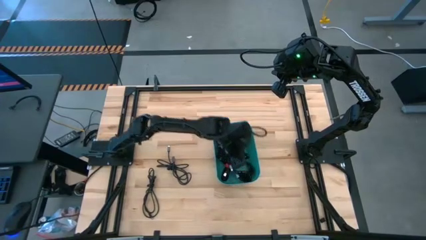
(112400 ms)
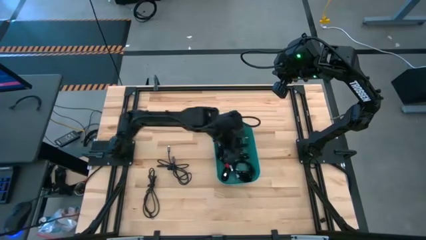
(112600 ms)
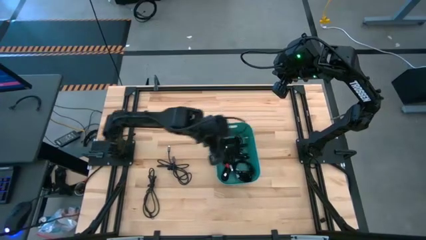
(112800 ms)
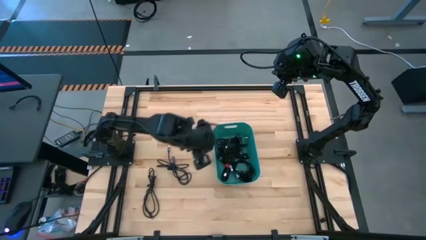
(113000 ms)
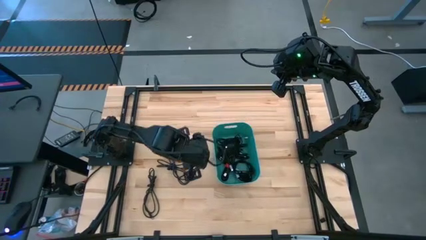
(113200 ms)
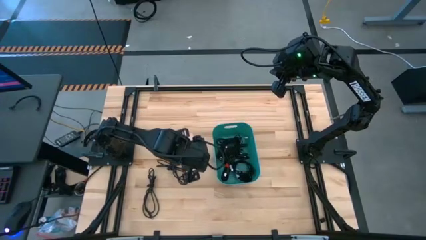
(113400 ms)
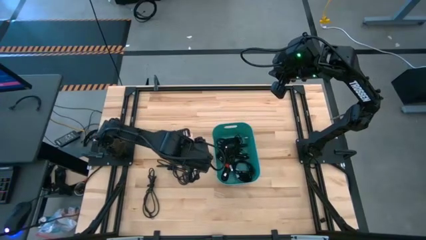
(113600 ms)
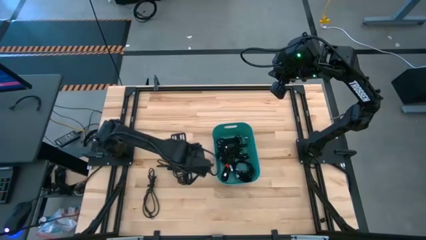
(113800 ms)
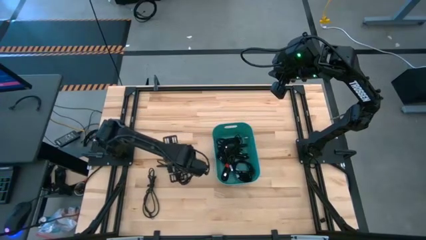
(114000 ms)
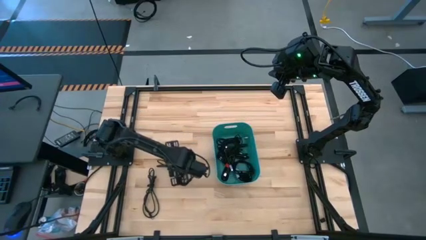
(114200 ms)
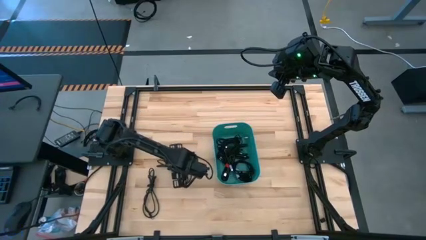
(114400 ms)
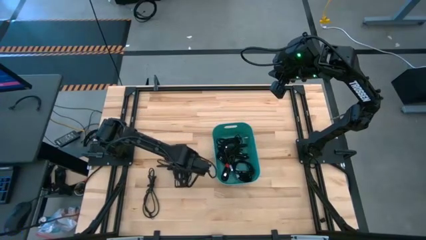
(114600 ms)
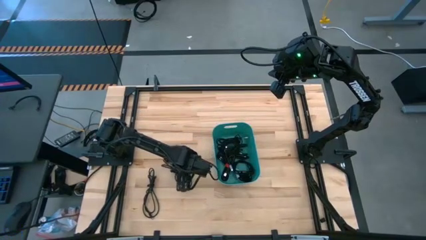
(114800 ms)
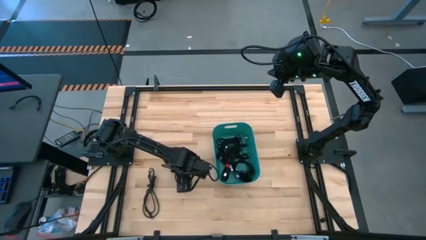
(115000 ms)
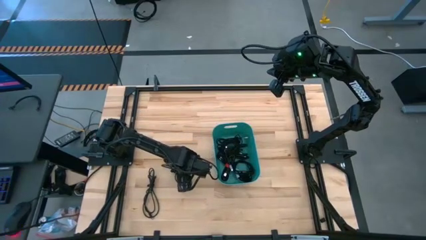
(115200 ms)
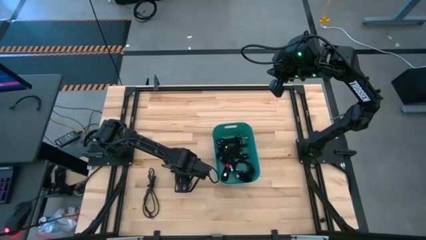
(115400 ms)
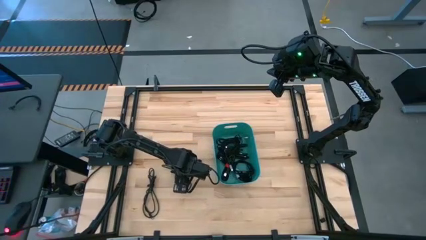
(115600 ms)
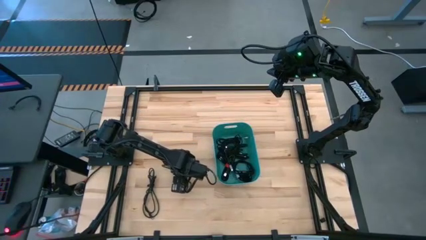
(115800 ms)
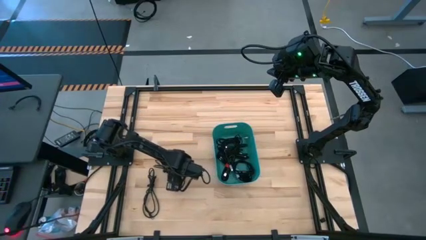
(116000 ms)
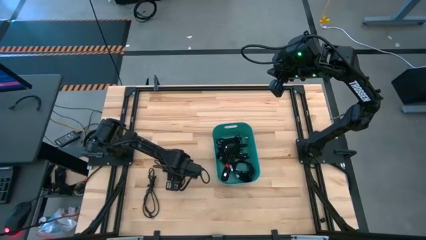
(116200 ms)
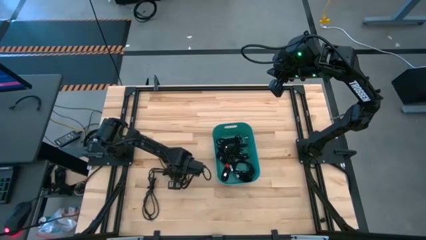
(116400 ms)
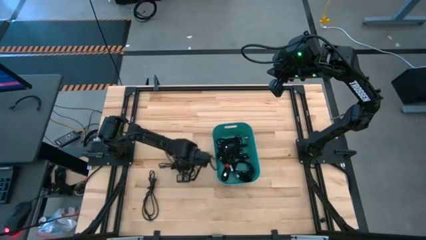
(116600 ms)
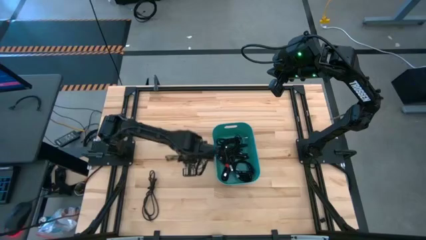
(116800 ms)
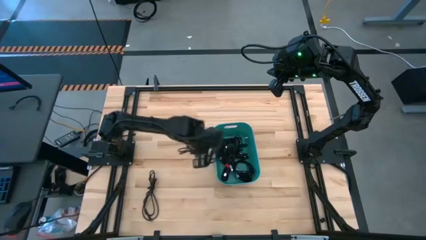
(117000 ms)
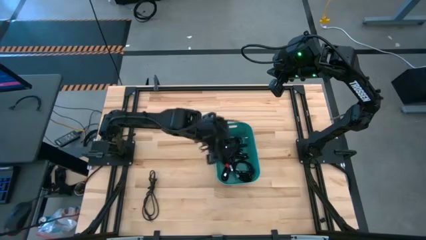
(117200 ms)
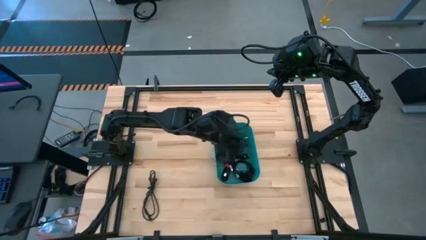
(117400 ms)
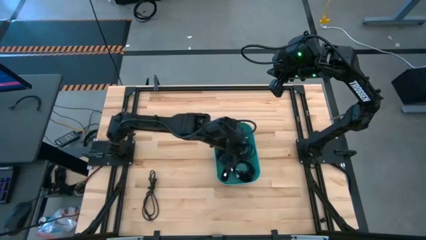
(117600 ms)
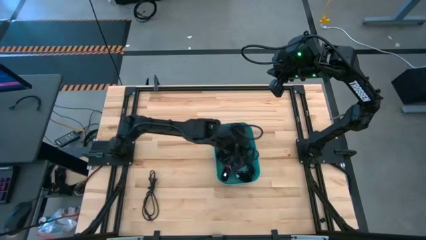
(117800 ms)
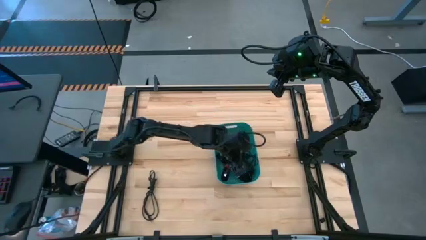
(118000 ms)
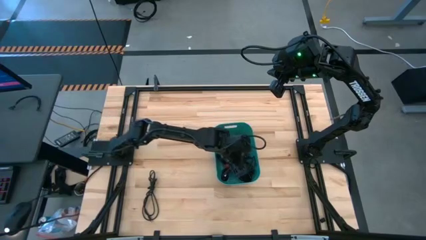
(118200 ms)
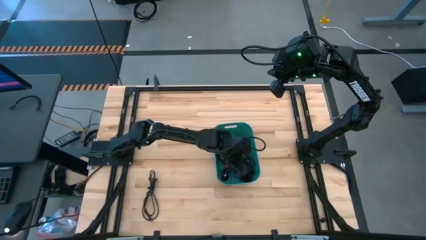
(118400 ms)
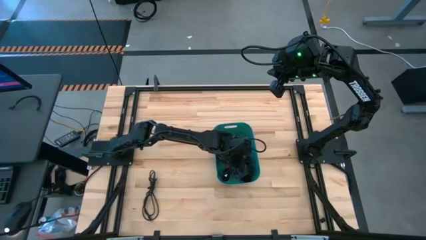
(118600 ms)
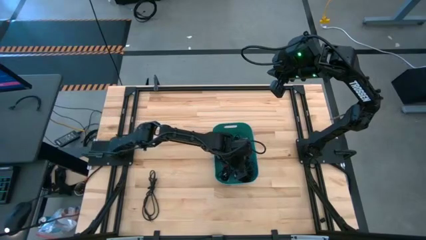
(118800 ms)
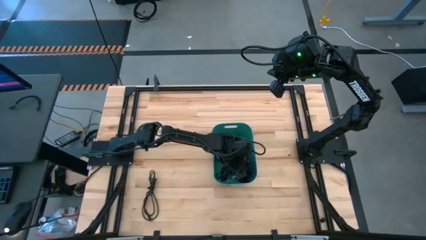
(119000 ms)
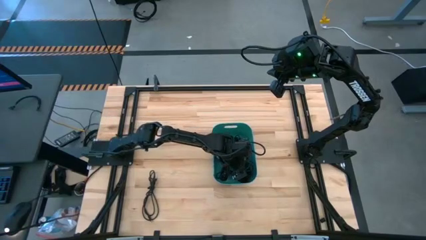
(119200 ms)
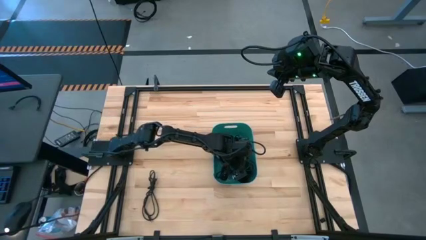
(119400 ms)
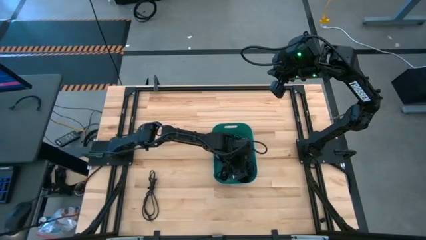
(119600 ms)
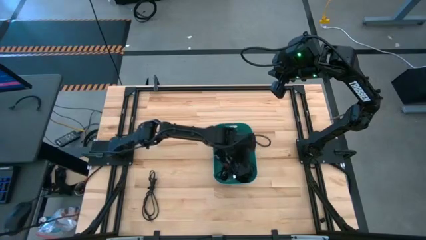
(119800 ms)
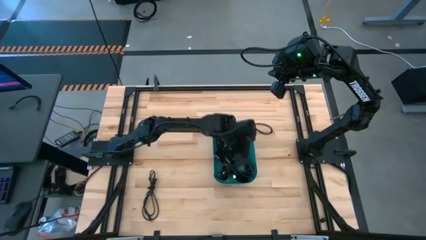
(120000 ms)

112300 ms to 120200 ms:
Task: Pick and place USB-C Cables
Put the top black charger cable into the green bin

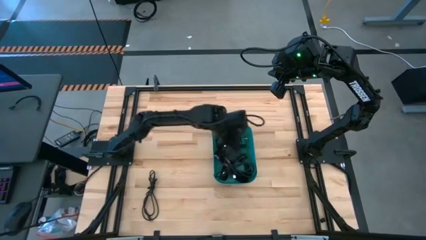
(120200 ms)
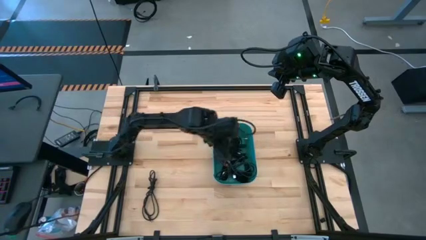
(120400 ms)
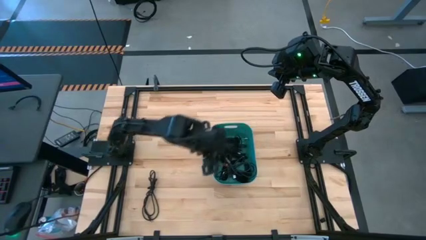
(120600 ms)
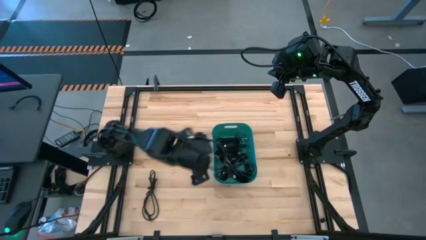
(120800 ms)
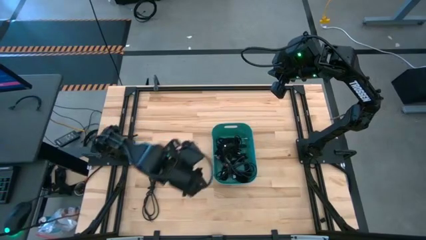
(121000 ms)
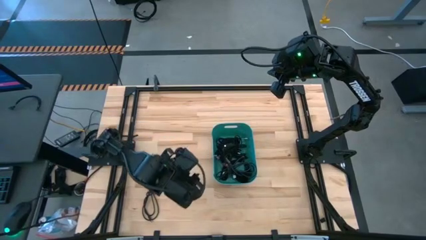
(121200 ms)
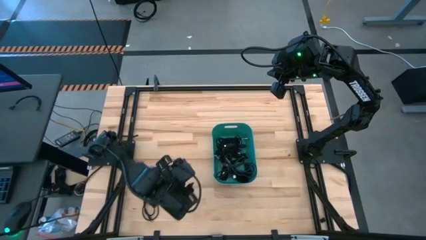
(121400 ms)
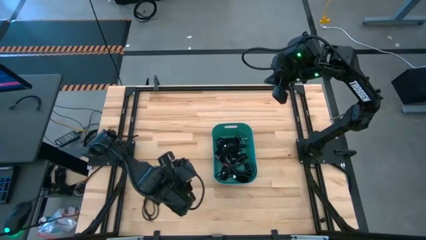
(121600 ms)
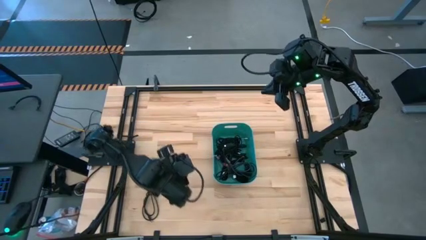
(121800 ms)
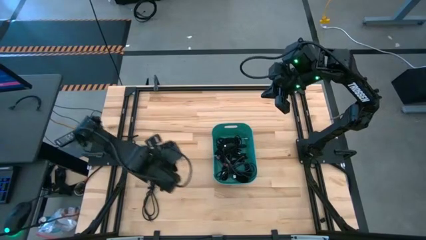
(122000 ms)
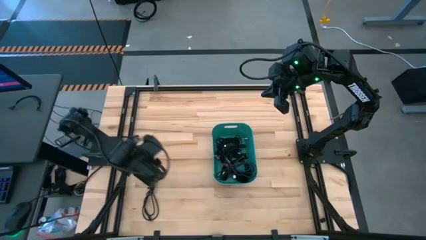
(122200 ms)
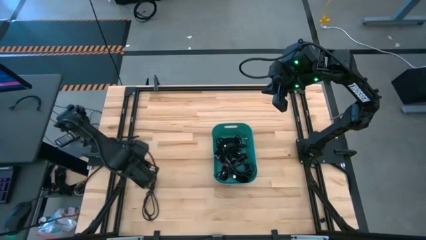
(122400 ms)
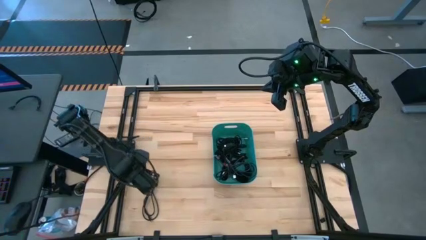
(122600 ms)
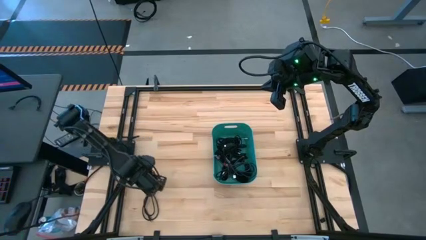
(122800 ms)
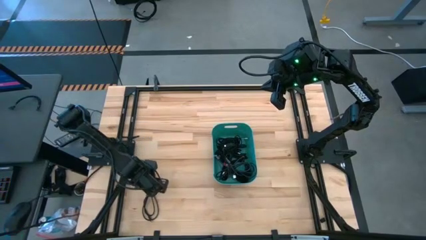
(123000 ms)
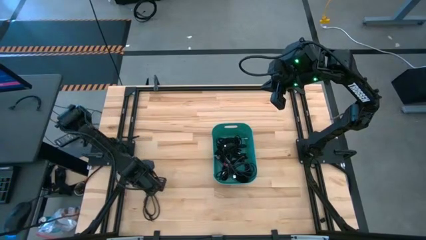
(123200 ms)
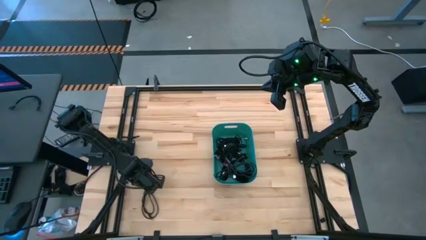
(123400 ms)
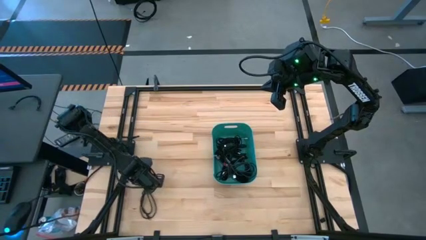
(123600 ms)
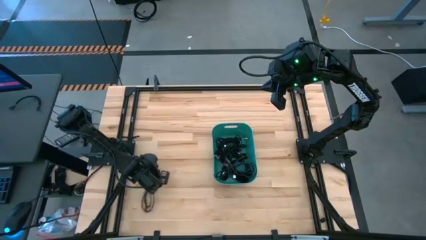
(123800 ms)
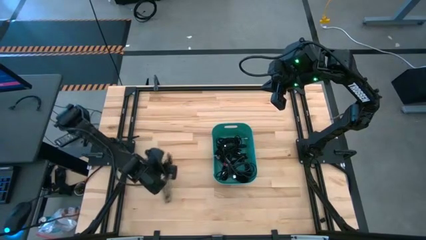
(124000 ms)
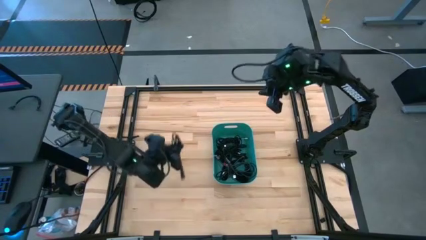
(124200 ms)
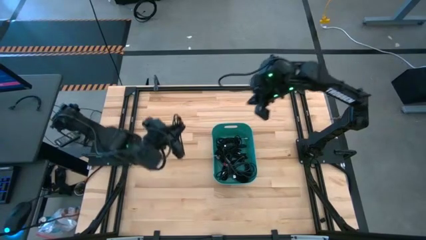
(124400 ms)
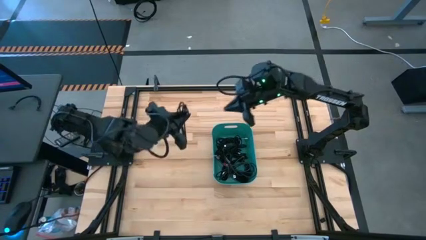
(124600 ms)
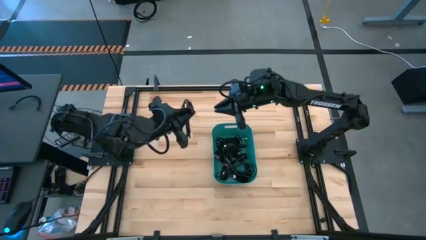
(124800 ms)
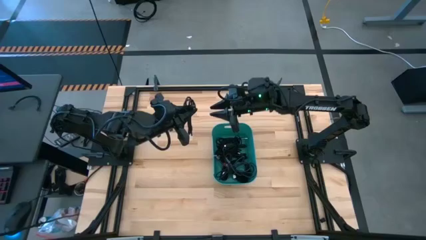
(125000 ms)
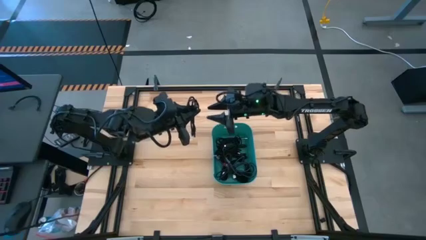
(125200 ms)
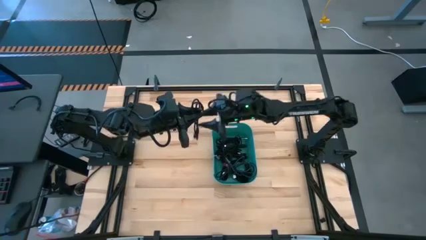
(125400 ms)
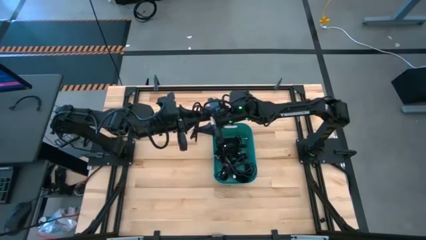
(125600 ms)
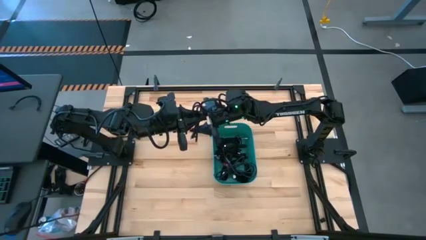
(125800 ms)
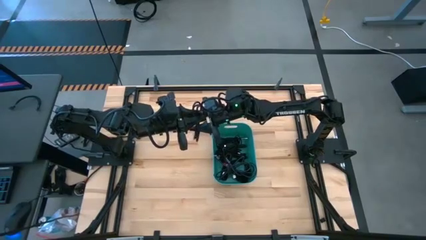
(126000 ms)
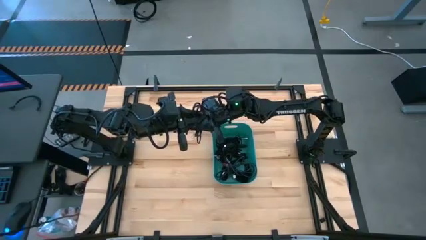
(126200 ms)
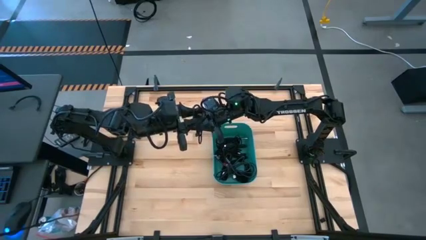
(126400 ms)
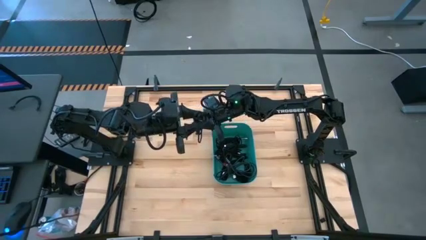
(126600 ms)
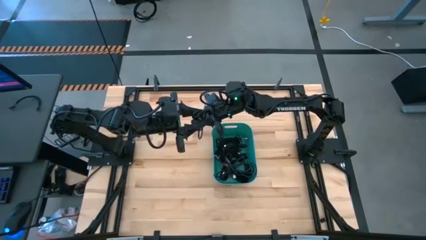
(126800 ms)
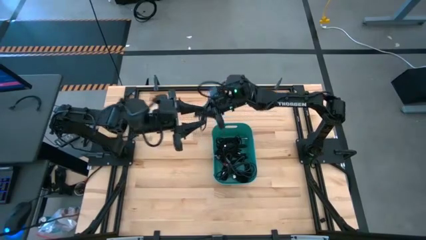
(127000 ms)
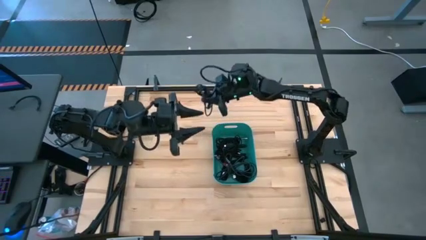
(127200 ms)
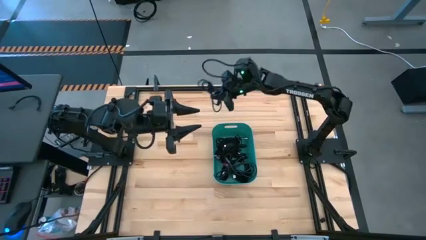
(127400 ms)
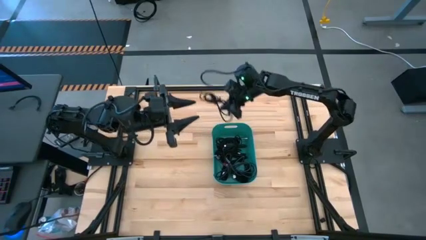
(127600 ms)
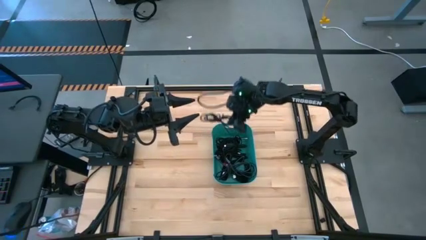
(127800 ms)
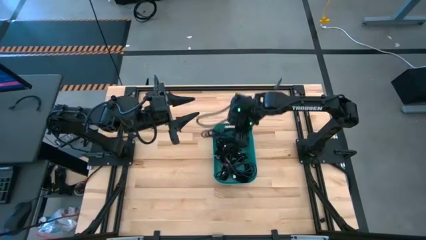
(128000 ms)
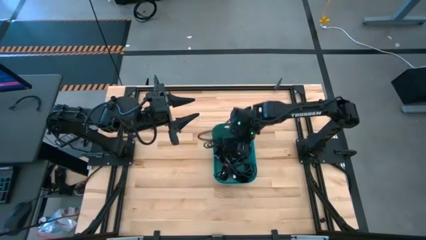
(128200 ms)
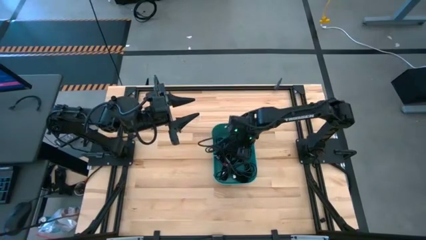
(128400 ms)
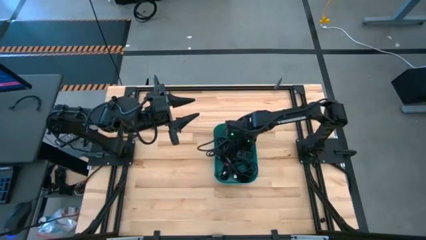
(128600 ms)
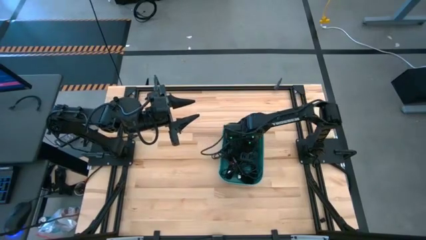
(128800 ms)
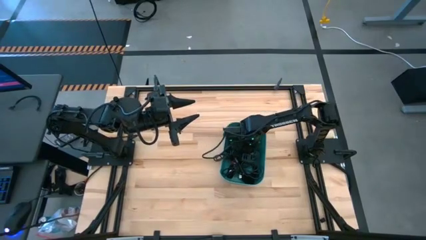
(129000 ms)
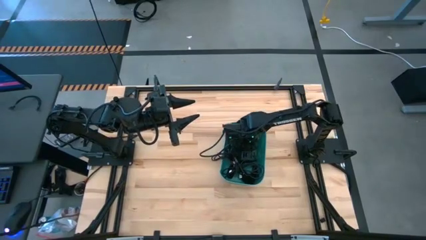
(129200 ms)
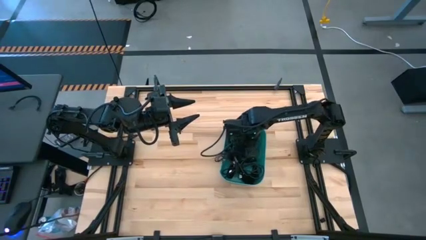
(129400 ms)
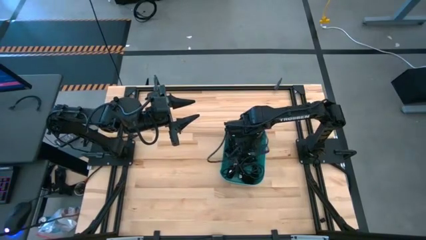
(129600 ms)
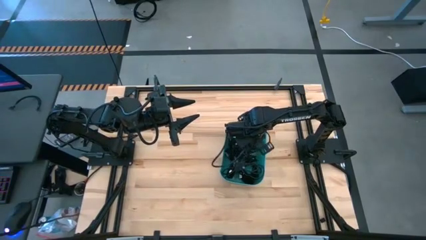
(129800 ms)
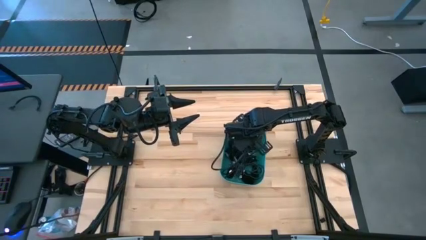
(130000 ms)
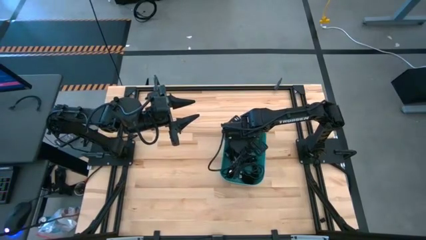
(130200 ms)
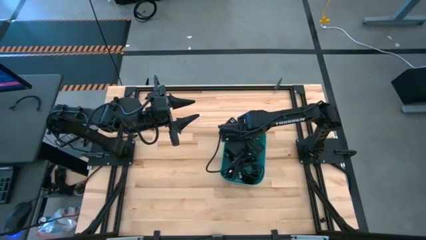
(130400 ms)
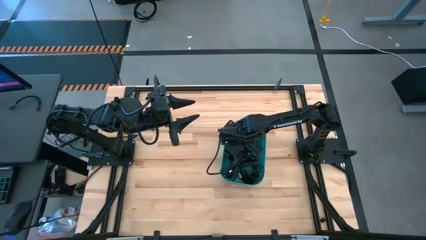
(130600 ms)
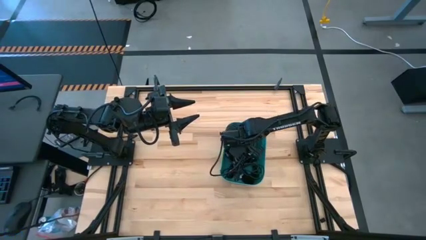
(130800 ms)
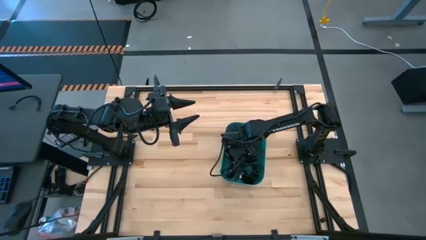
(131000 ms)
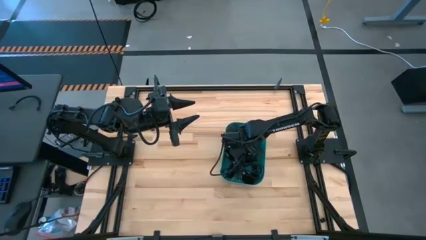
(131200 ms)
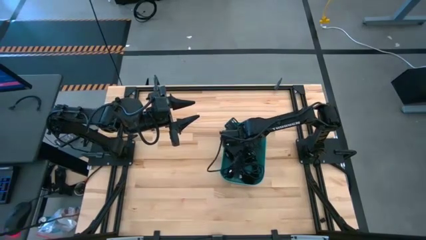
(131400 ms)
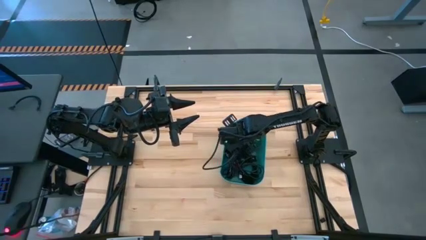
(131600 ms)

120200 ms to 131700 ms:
Put the black charger cable into the green bin
